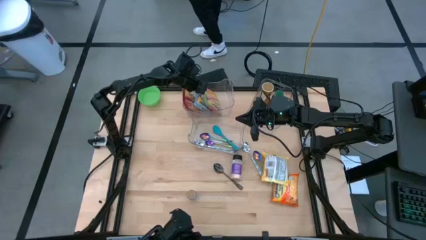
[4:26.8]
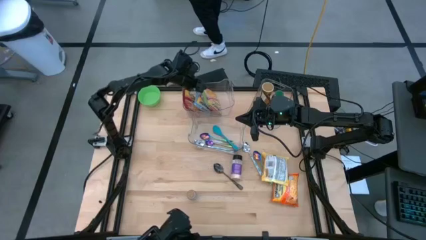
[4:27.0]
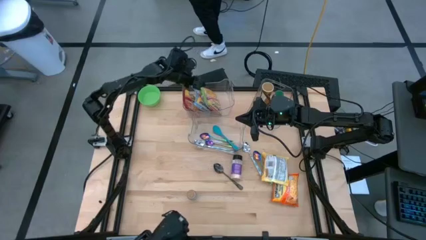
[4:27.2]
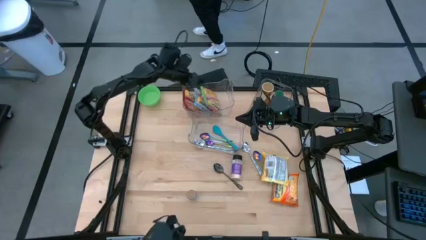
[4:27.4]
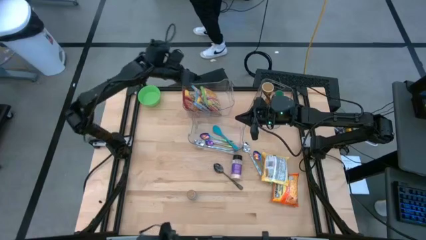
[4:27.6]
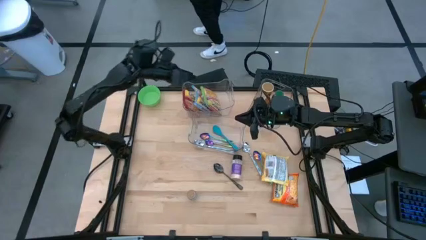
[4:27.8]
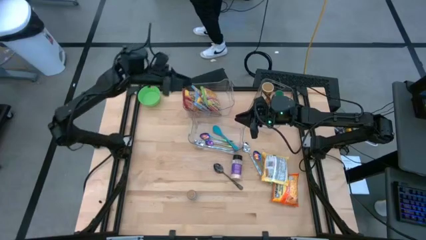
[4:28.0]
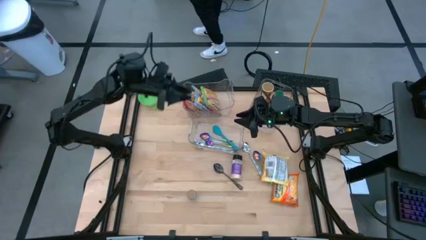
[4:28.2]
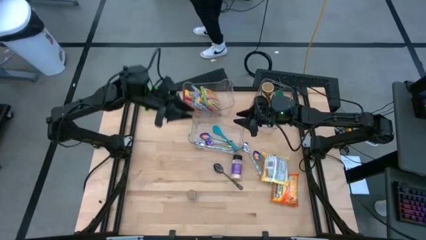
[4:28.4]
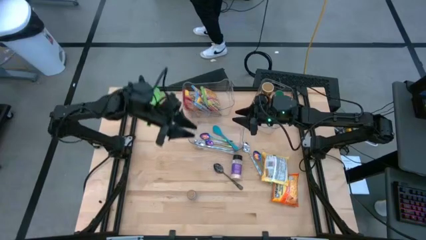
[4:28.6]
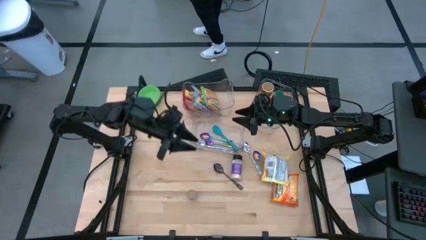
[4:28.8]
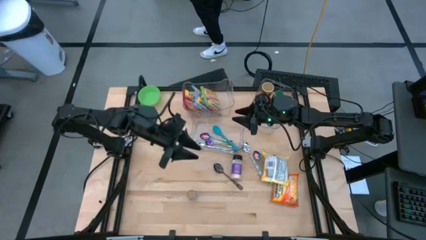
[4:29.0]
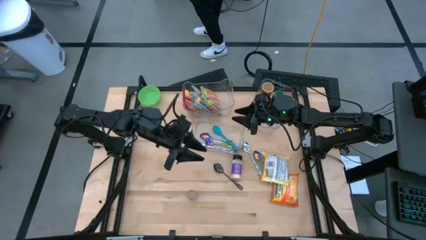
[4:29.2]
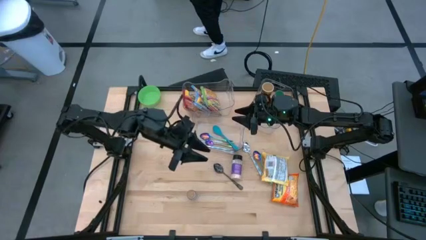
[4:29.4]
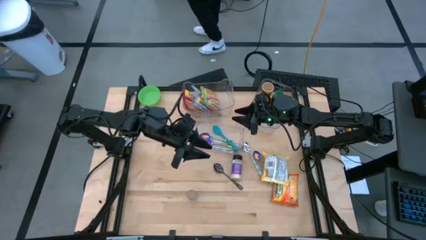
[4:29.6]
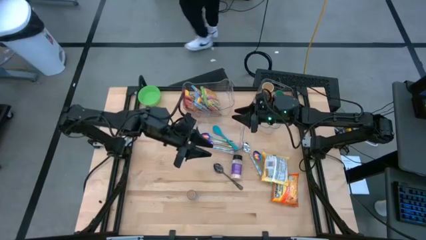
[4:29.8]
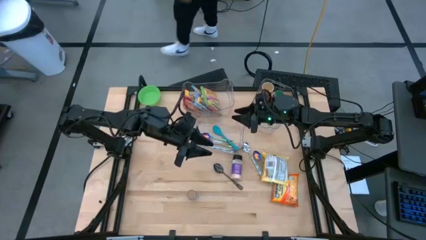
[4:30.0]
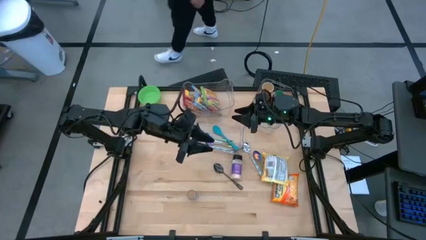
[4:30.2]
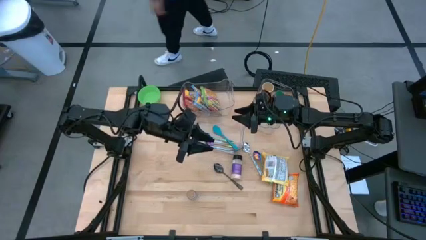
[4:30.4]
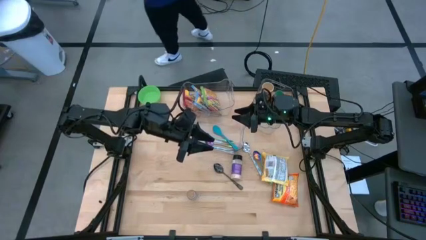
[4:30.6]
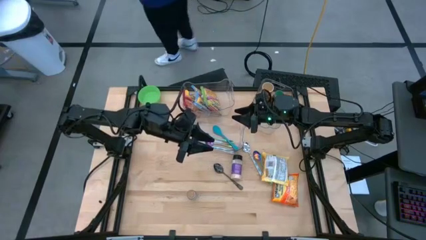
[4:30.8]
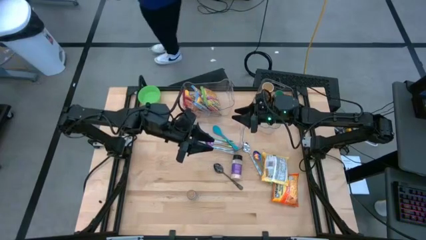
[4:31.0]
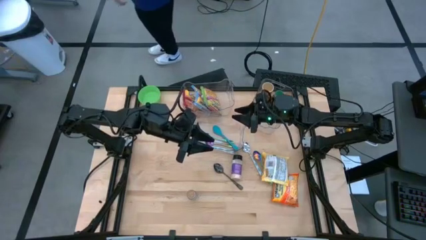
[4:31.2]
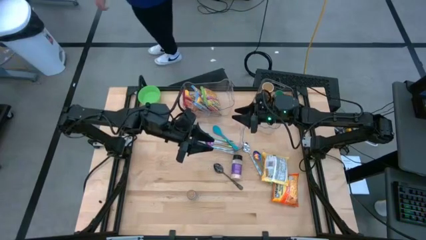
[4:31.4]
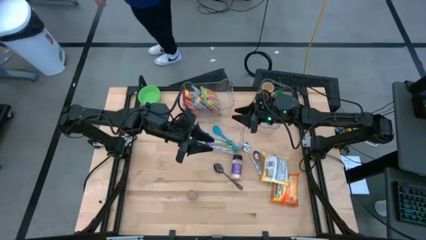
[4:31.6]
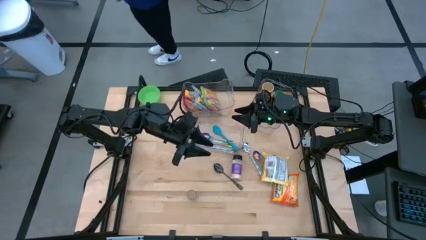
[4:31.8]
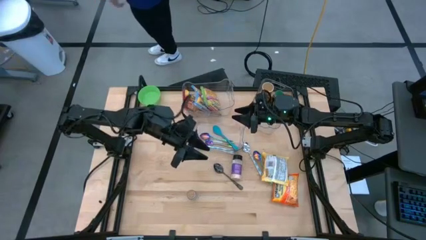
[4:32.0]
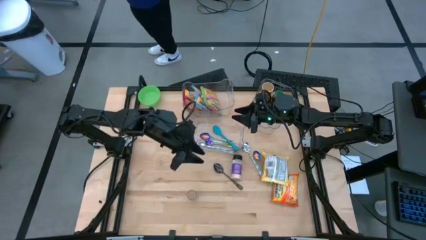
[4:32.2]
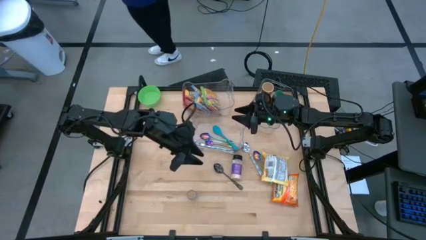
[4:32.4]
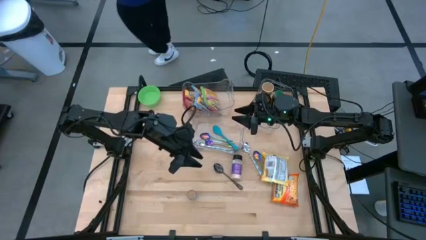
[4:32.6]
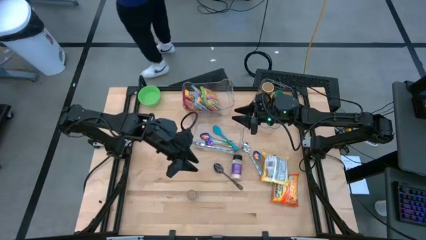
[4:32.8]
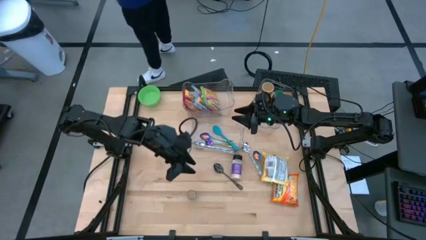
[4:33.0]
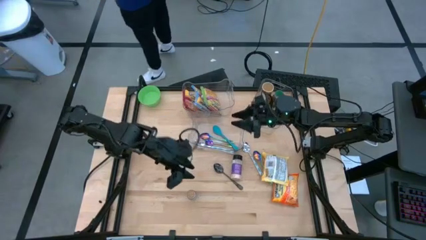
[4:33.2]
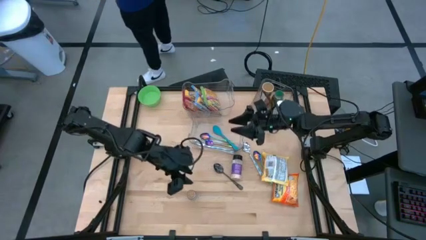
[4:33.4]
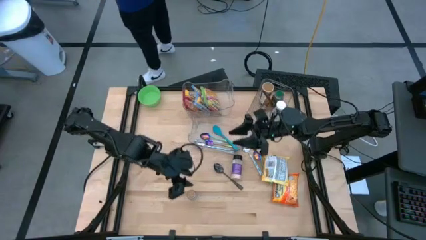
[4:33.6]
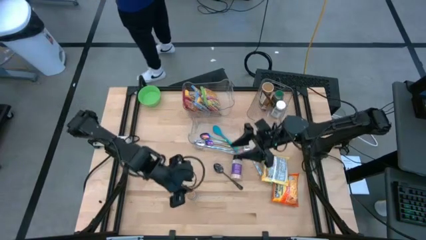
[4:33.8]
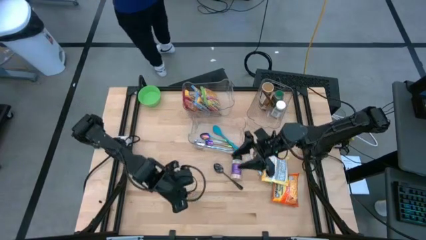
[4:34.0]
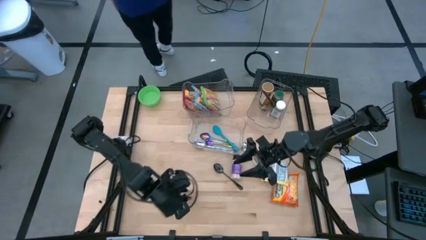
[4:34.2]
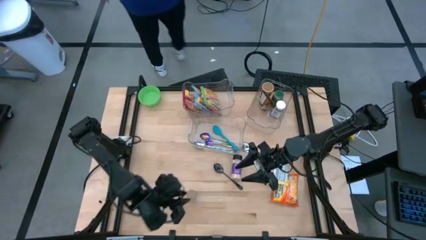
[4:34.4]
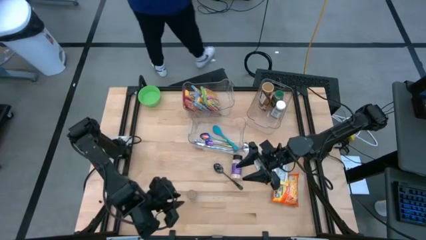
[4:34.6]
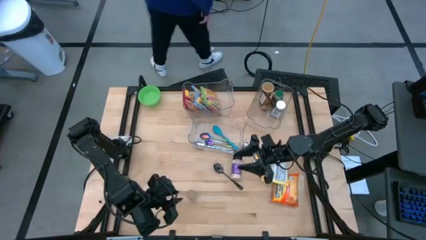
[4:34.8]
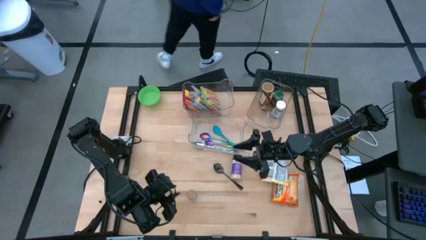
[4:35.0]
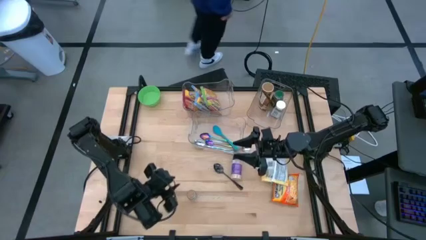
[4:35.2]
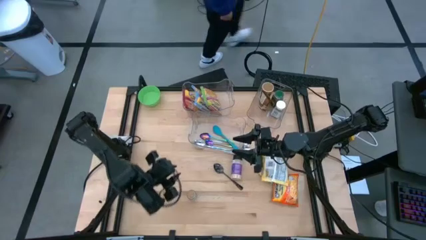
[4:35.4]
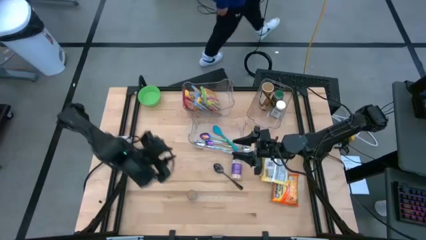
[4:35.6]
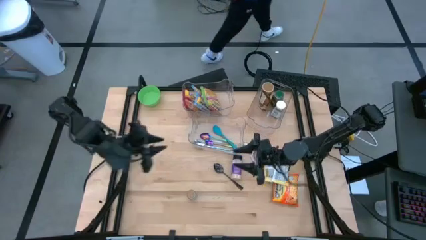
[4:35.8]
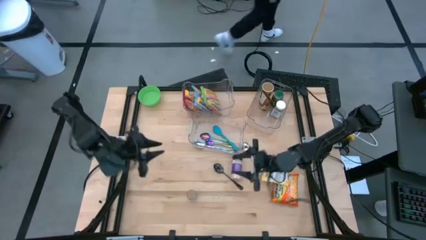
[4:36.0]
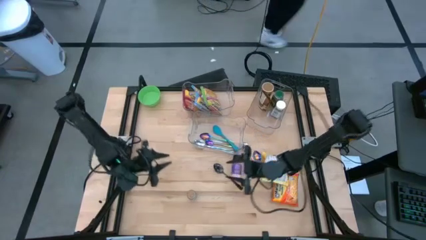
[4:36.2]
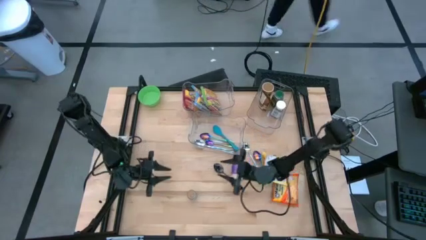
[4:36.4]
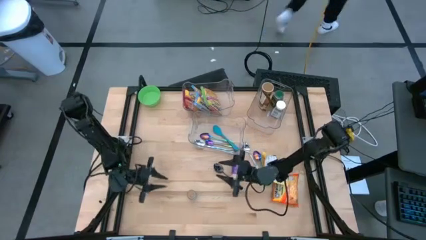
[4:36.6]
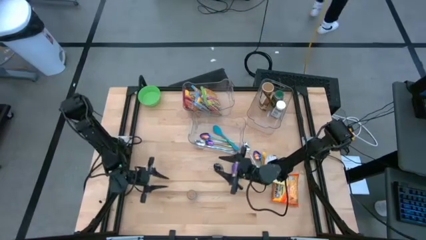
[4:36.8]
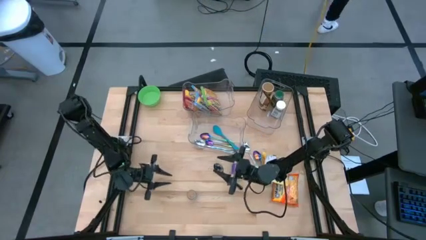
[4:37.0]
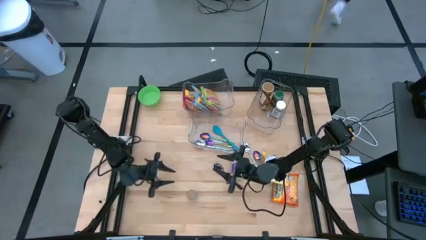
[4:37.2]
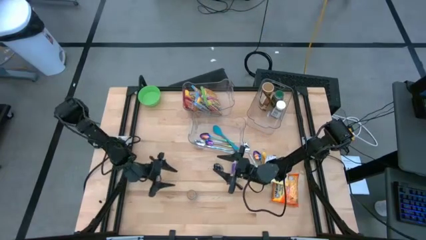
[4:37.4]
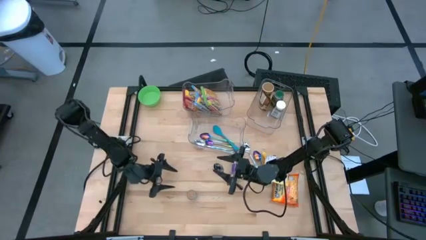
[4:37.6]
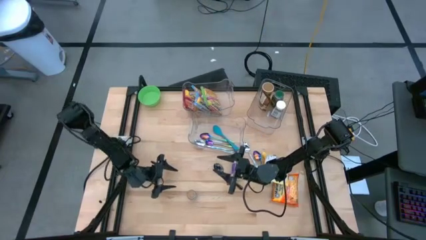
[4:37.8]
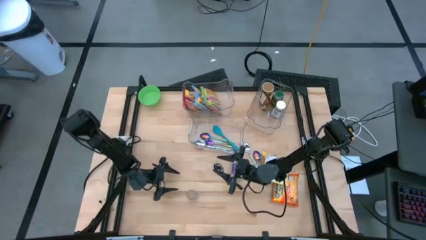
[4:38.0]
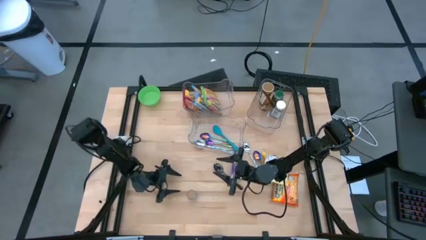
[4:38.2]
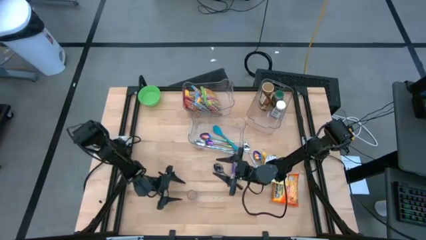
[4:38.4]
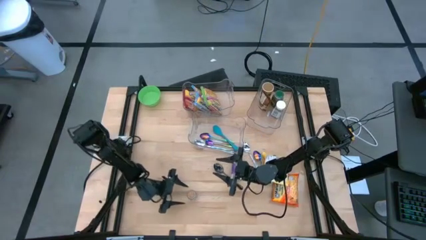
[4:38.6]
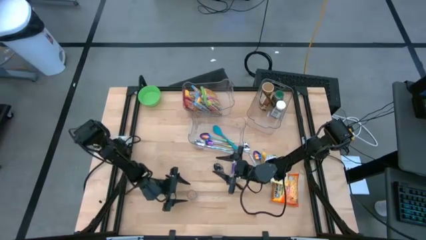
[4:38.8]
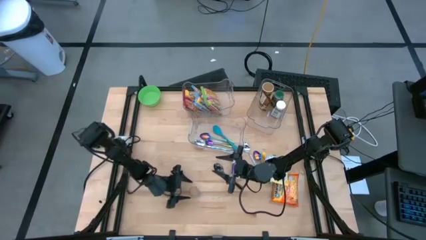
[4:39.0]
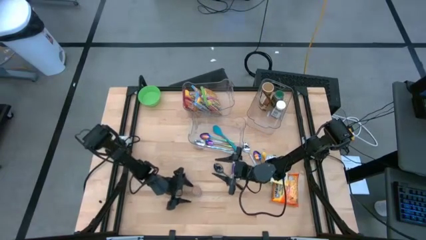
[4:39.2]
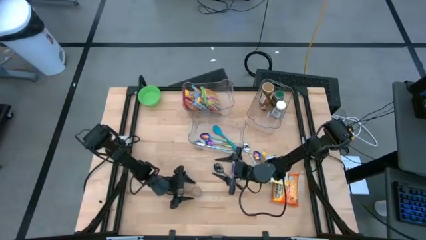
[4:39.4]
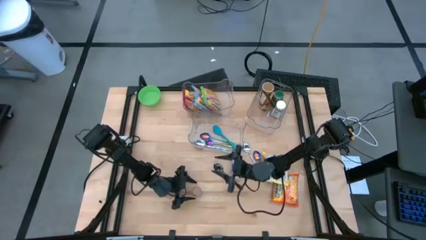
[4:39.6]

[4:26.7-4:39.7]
Task: Pick & Place Food Item
Put the brown seasoning bottle into the top right transparent bin
